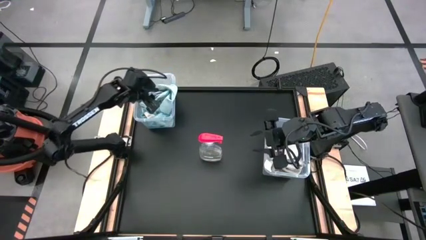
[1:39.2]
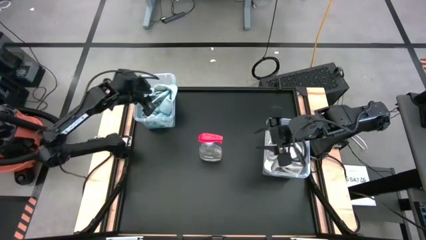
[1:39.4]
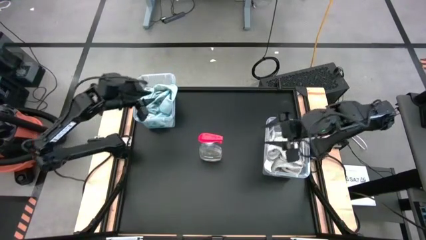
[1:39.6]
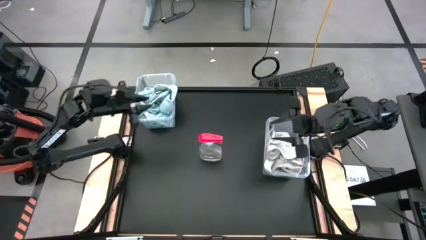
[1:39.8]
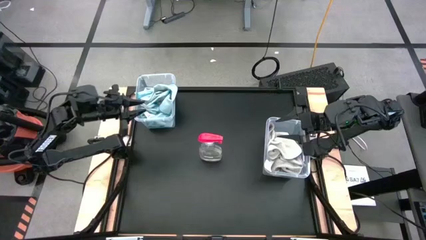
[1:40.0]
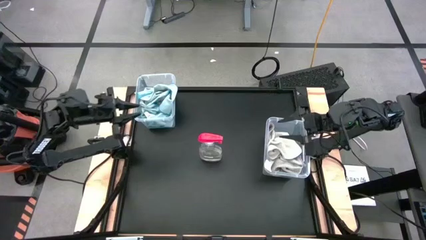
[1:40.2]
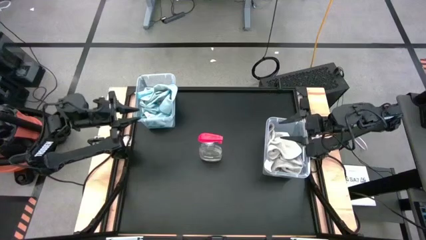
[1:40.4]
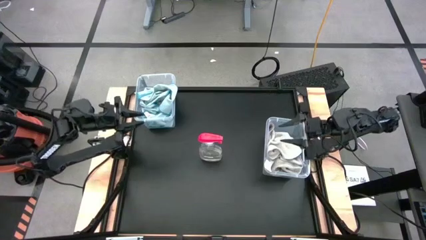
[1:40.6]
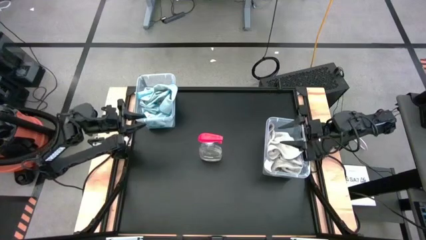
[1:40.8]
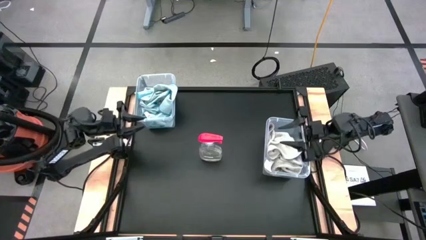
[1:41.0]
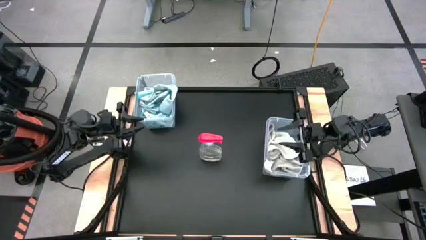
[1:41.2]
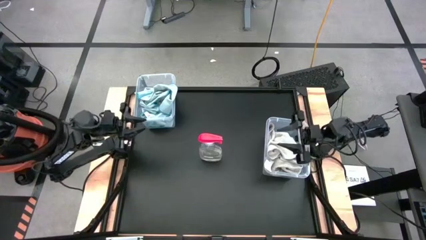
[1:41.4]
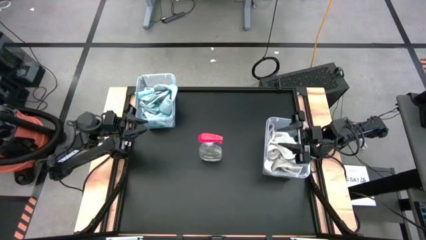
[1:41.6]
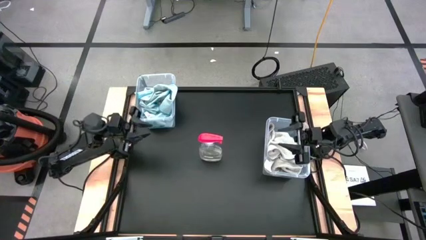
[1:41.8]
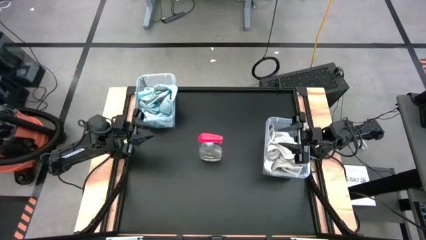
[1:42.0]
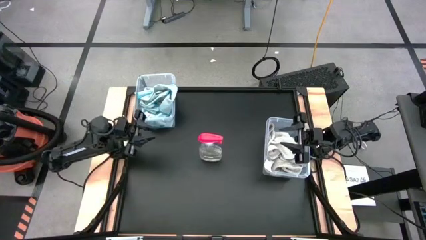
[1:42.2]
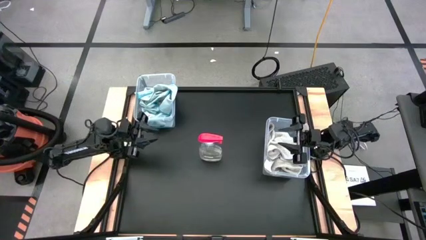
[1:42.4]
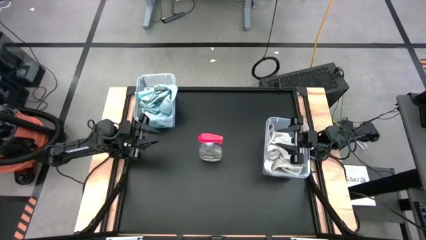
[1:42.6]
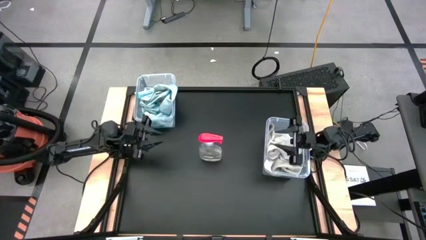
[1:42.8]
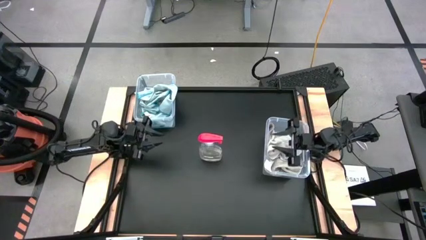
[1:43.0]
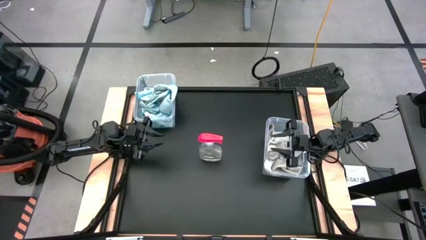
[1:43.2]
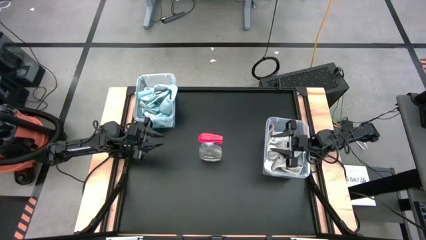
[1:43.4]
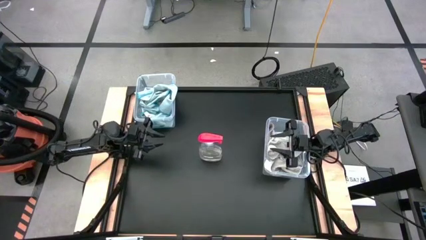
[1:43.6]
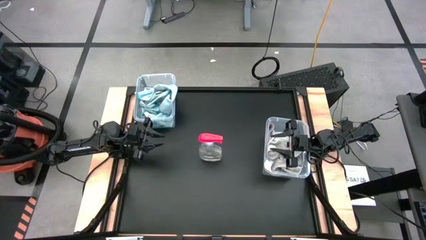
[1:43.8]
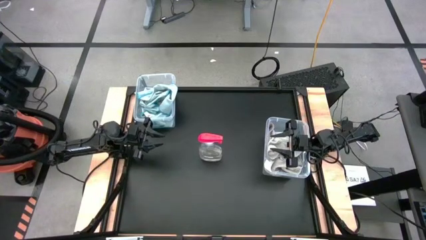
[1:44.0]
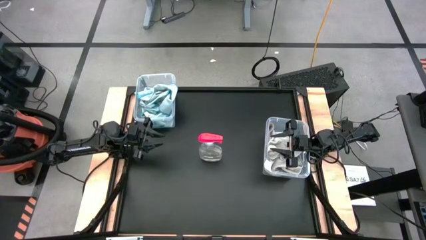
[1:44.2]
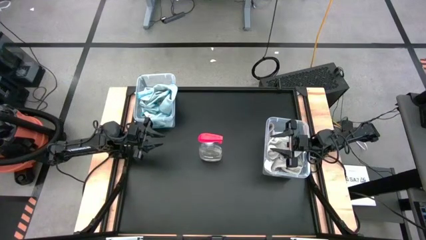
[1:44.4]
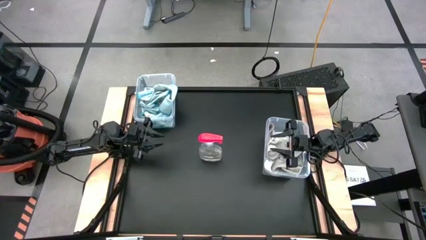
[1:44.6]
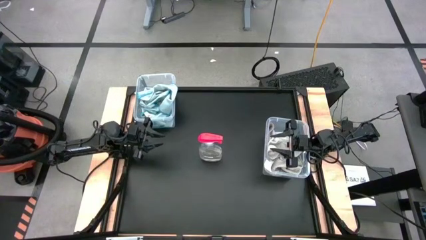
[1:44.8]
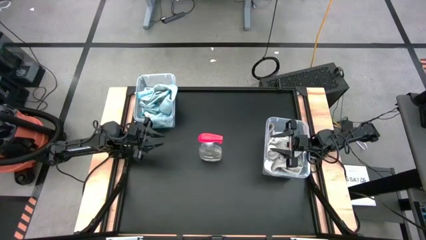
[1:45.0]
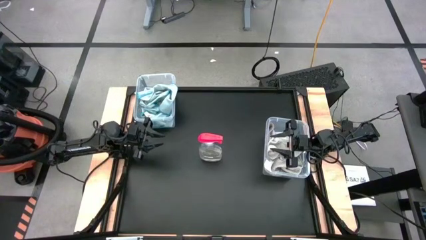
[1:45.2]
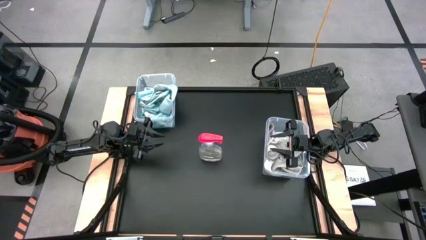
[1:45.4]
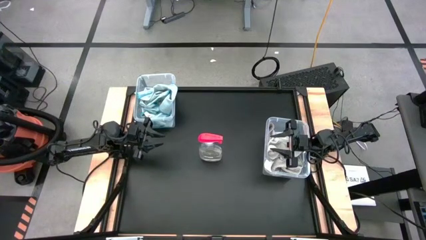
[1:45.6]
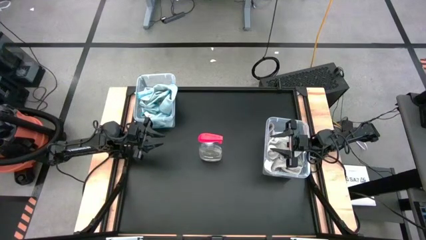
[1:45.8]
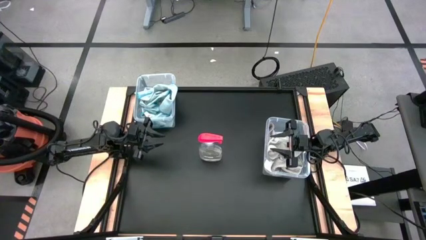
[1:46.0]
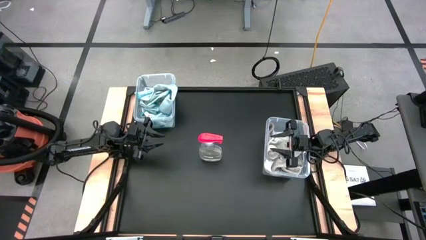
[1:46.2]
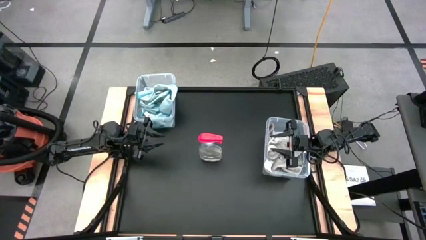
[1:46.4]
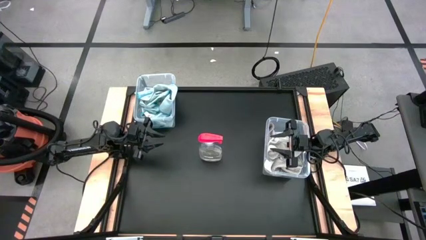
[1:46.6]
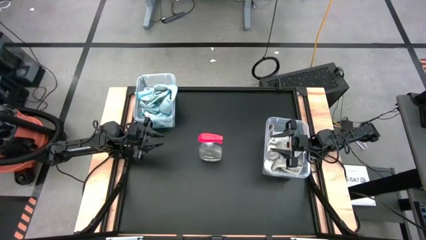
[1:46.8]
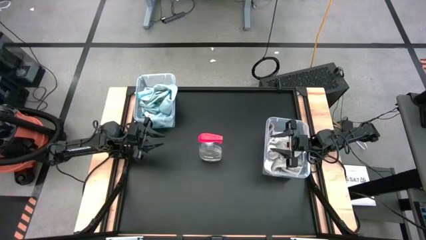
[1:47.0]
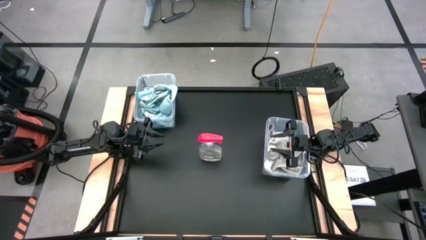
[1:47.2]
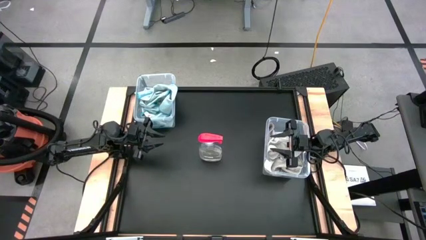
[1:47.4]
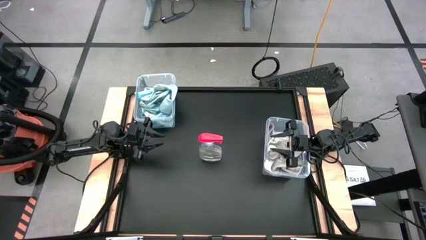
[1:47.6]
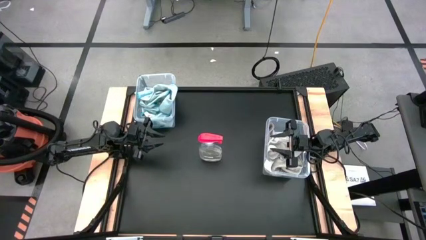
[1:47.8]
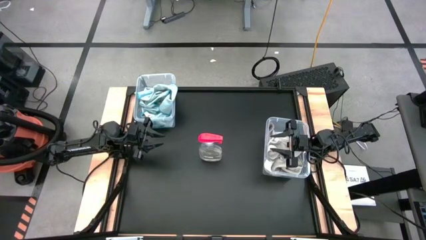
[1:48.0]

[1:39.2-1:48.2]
Task: Sort microfiber towel by color & place in baskets
Return to Home Position
